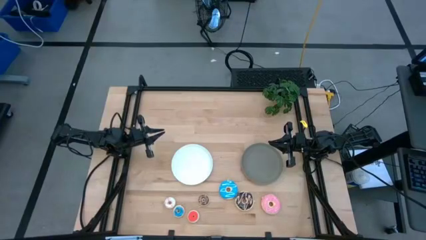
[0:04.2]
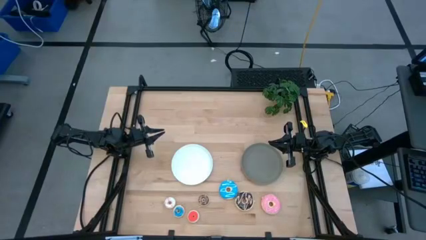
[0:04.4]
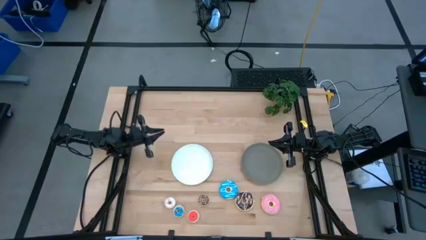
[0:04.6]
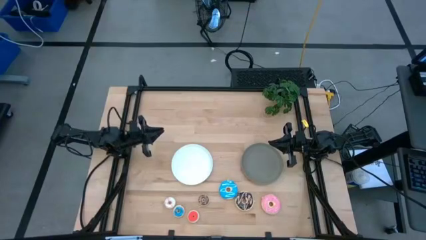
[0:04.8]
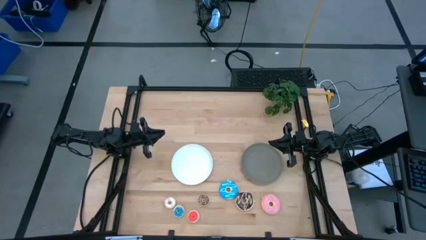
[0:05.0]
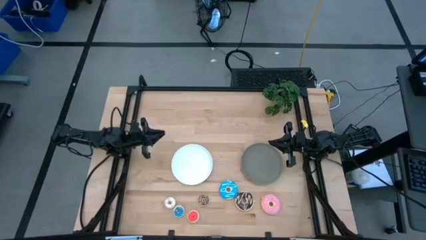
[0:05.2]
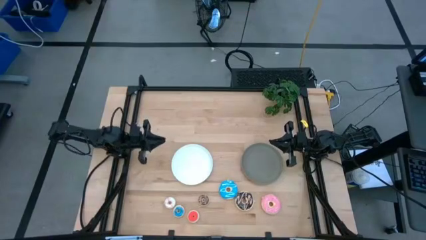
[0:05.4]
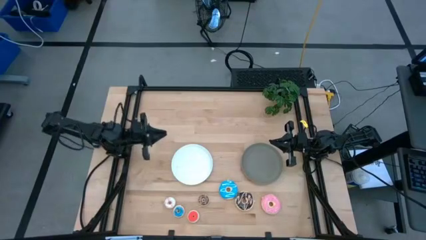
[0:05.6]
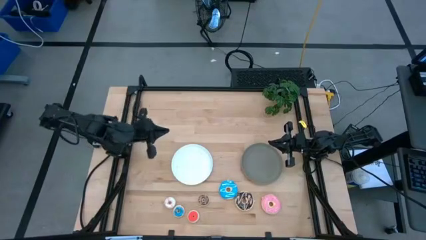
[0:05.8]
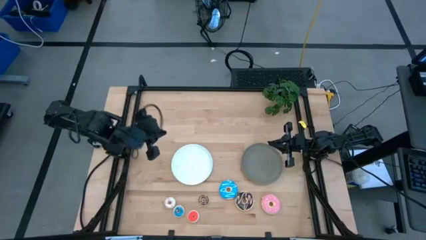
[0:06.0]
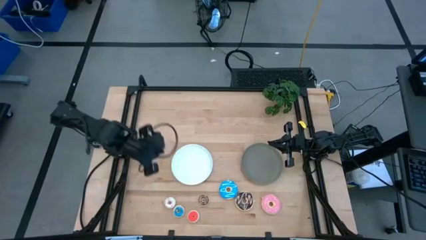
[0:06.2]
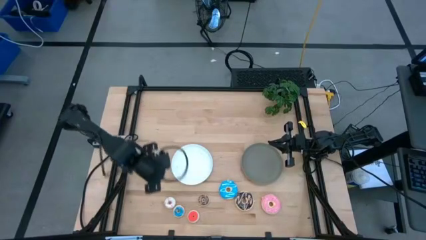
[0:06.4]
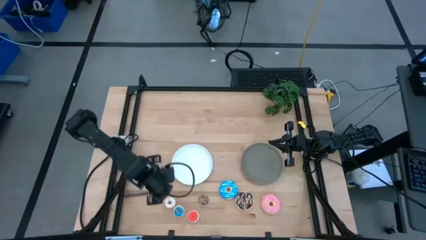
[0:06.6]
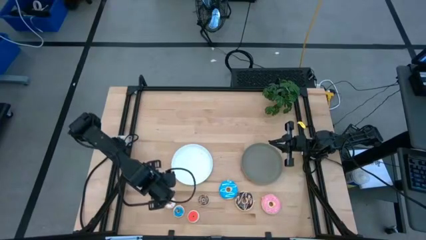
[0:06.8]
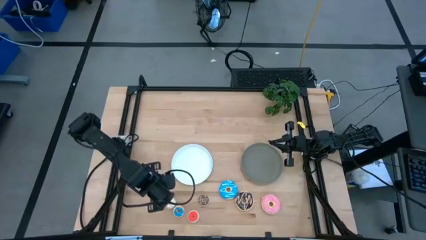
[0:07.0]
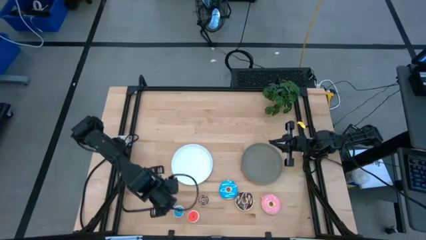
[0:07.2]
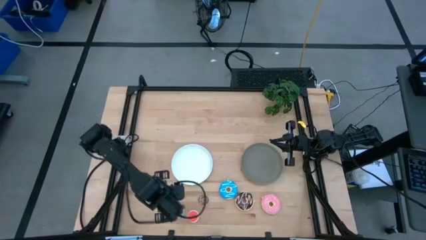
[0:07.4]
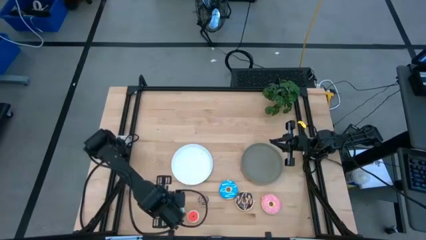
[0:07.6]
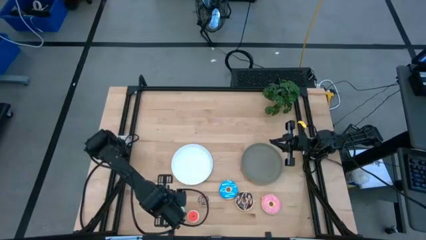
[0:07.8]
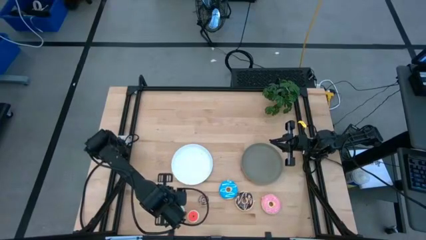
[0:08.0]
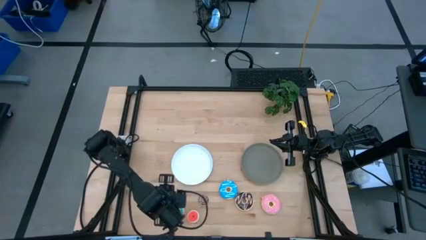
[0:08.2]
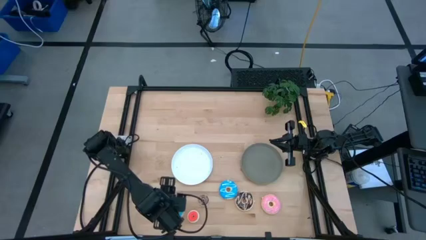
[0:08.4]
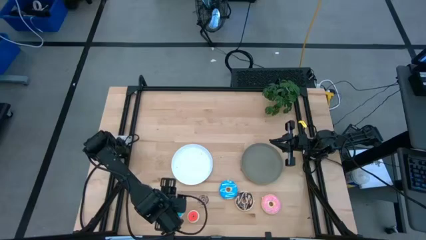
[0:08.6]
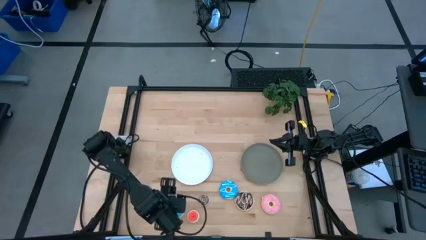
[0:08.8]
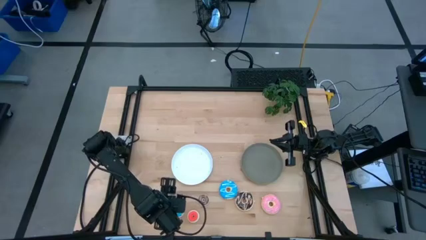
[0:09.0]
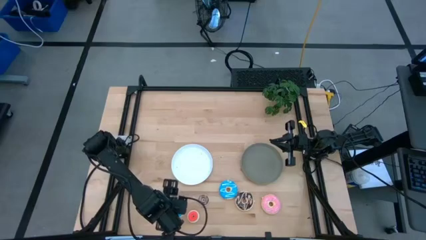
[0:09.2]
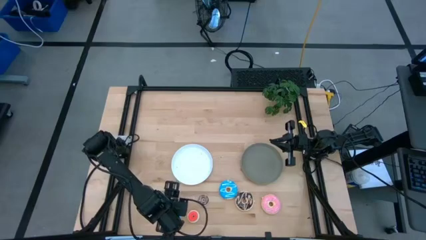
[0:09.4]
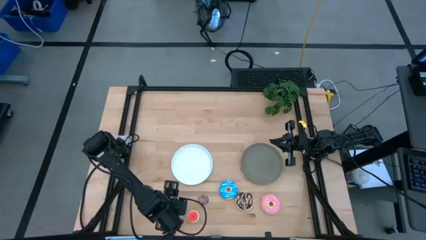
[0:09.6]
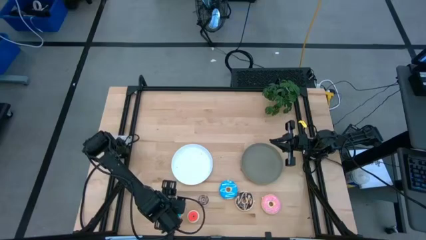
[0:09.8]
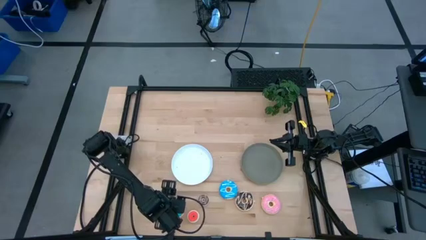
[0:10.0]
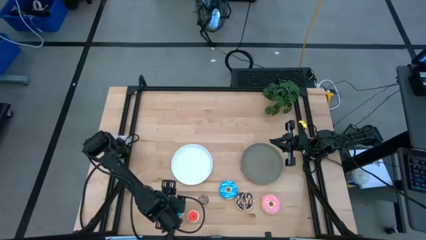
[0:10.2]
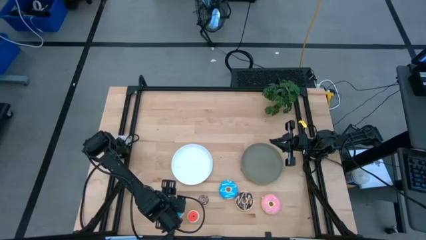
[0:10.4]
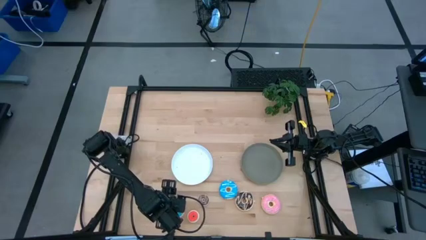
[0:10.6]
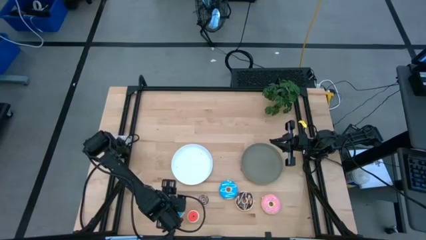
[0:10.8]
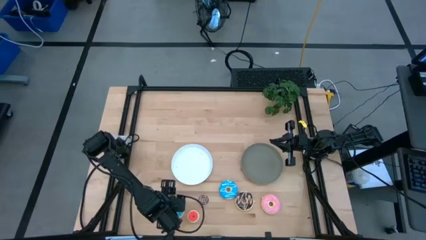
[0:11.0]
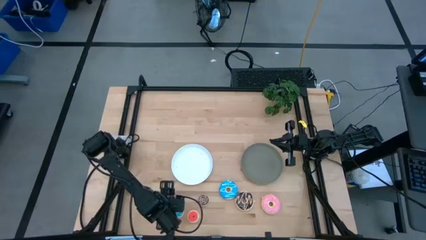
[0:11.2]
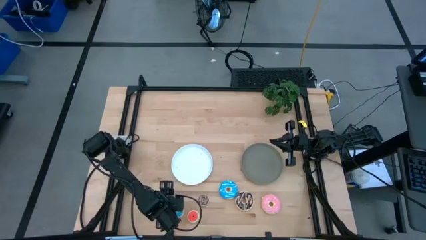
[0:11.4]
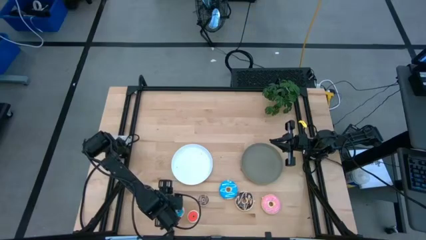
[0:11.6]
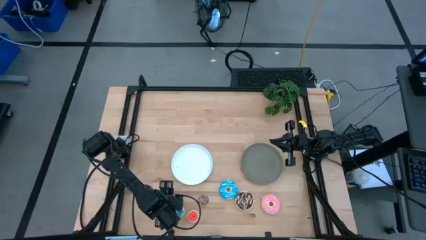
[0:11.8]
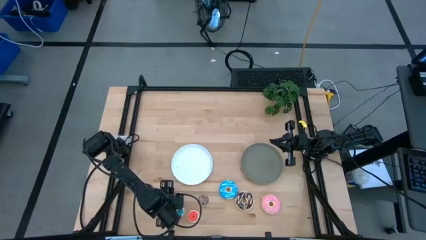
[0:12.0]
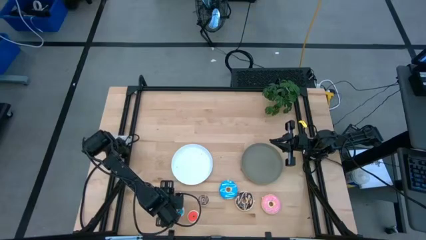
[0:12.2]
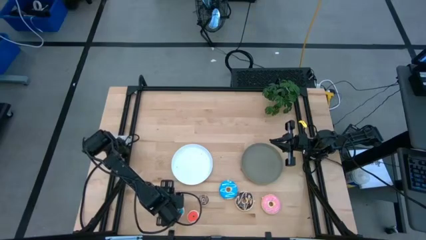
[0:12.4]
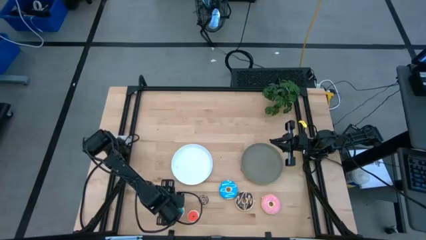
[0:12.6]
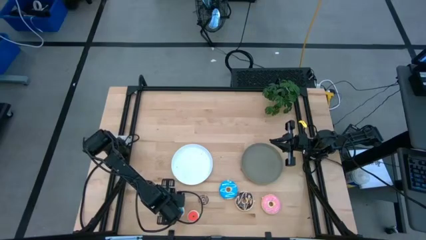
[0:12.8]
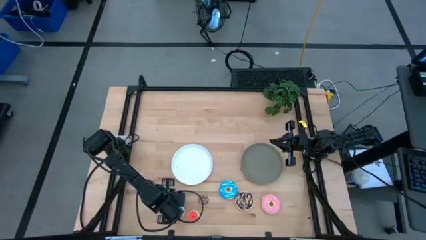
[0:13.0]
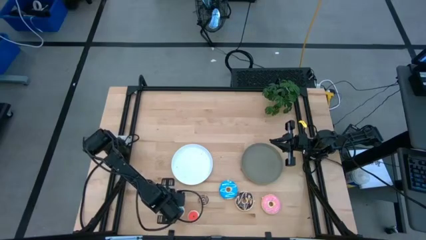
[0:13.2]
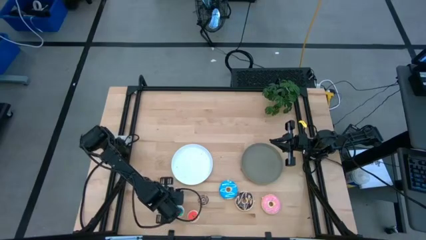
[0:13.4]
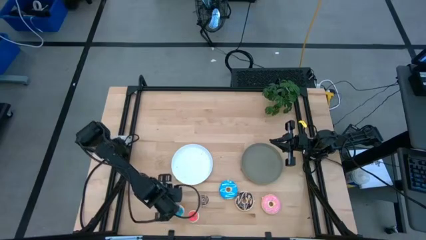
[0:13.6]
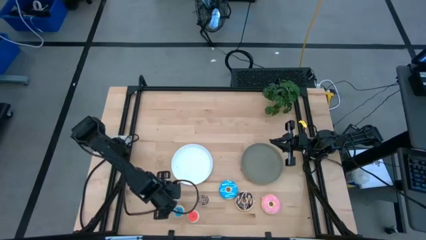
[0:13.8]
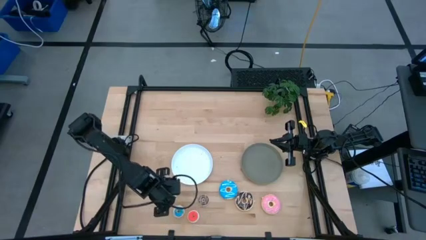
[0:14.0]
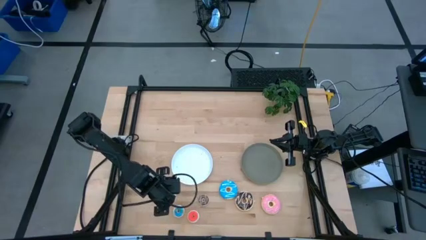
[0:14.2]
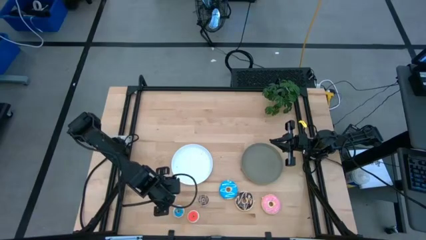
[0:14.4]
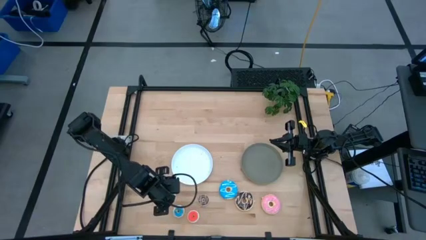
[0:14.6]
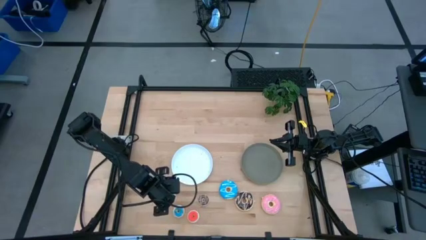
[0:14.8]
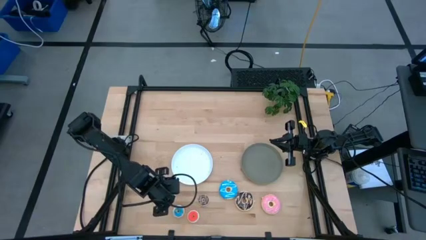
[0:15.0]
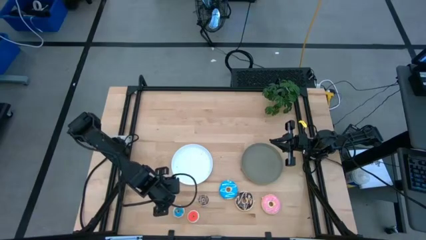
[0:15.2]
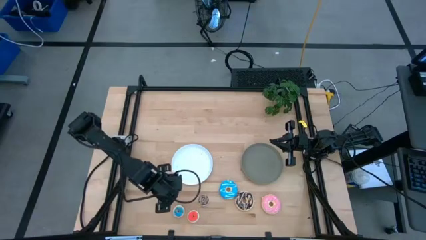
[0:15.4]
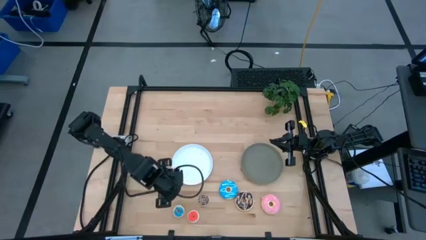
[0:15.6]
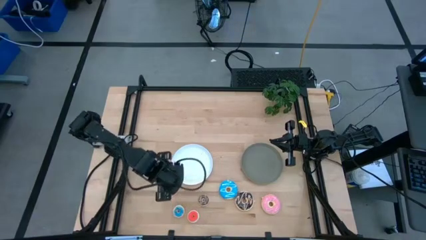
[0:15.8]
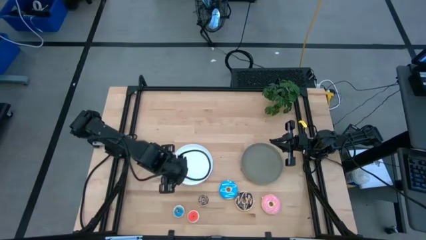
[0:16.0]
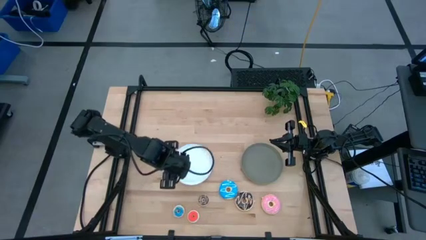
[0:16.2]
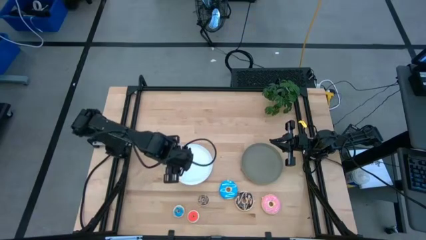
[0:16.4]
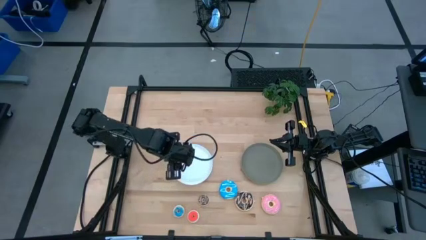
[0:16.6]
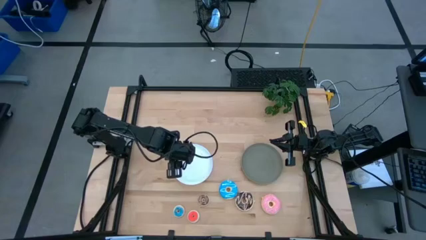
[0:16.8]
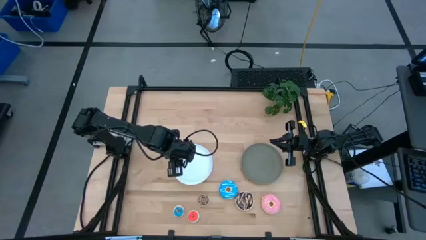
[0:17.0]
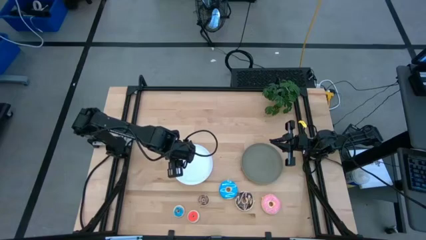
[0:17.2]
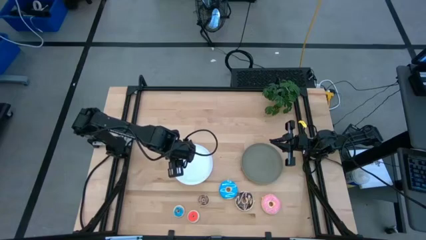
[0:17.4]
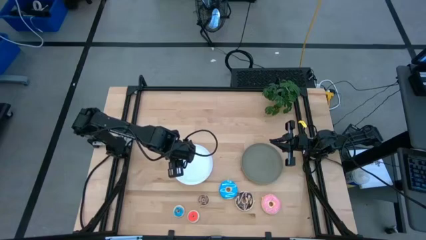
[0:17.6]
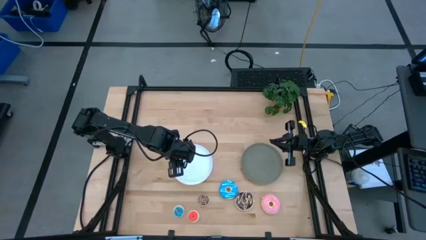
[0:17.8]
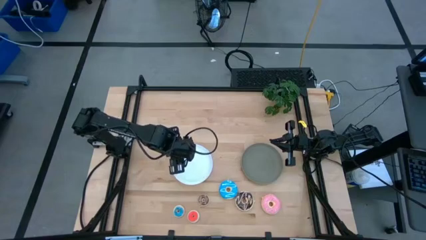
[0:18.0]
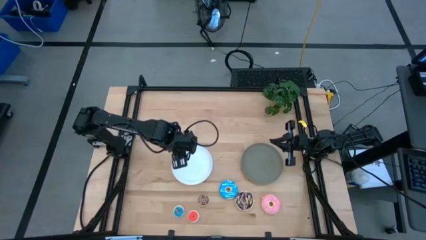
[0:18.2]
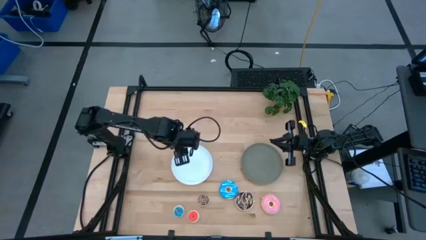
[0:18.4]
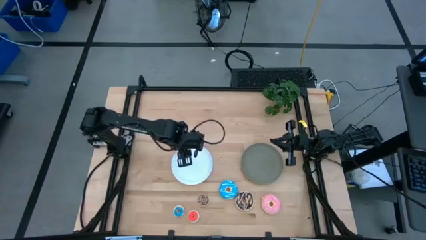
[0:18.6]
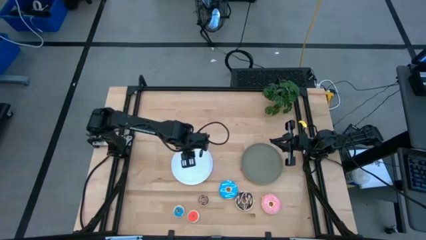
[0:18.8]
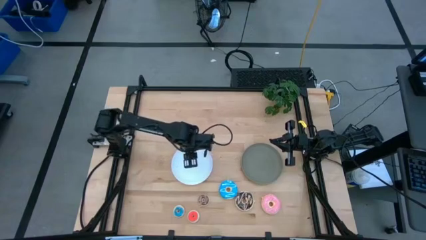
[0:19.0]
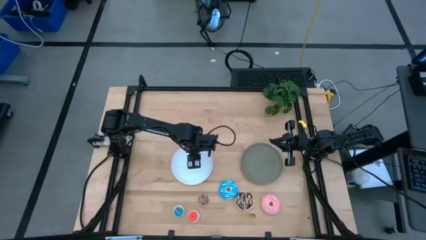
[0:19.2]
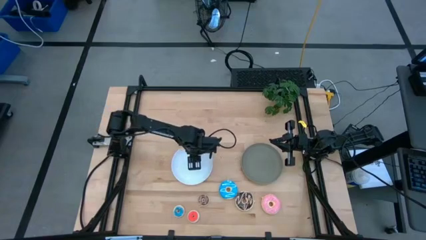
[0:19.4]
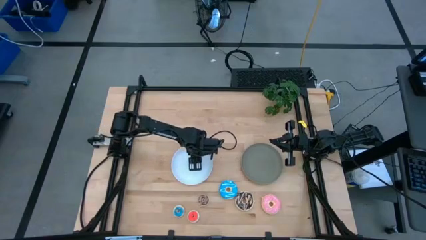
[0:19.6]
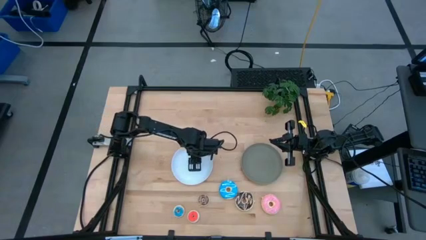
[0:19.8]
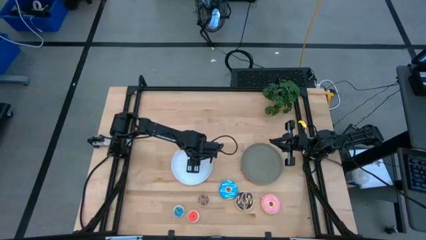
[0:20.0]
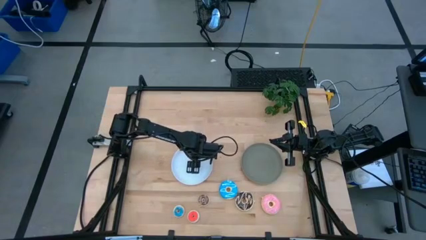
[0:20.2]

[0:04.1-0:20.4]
Task: Pick & Place donuts
Put the small white donut on the white plate
